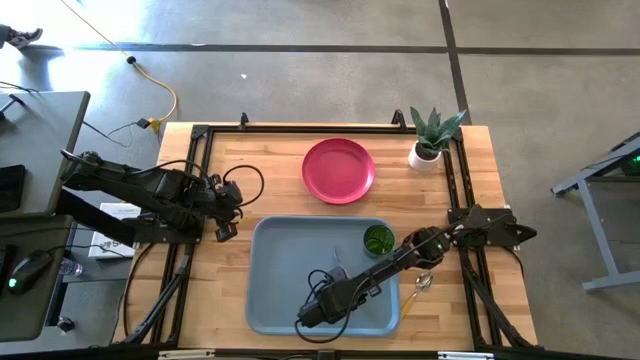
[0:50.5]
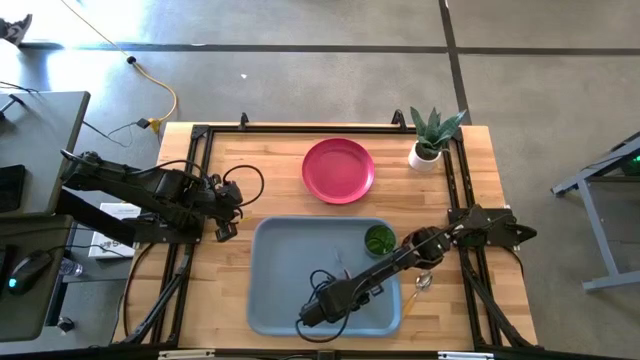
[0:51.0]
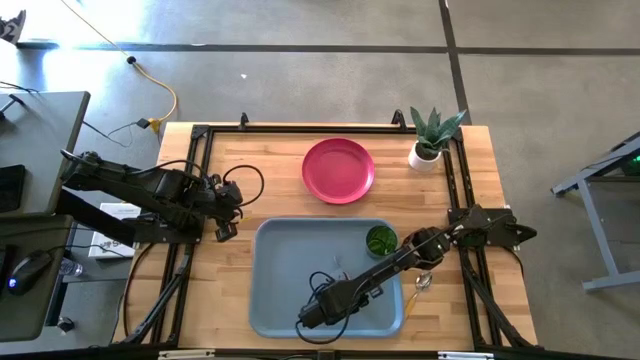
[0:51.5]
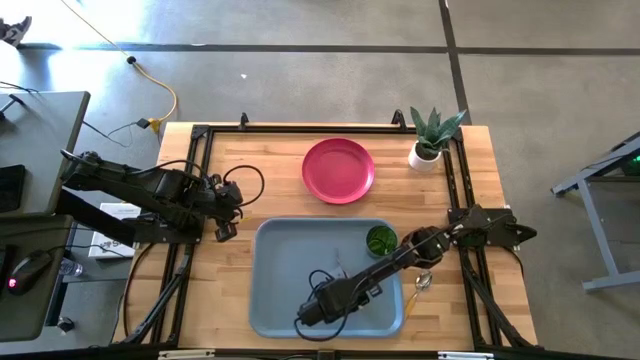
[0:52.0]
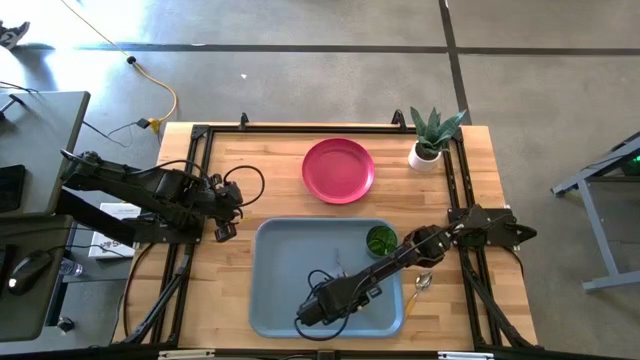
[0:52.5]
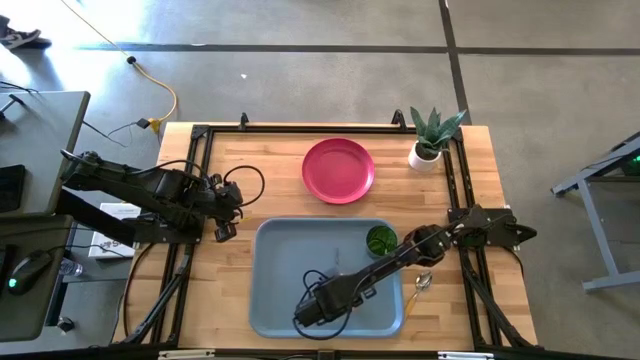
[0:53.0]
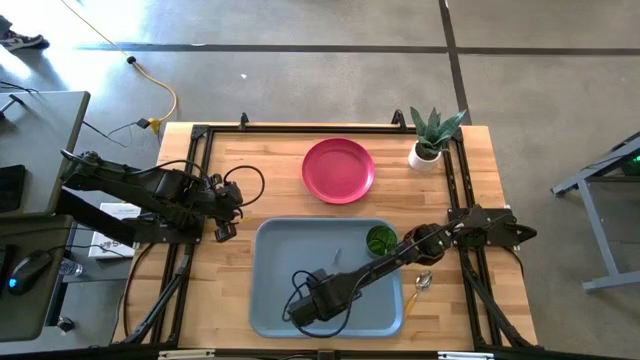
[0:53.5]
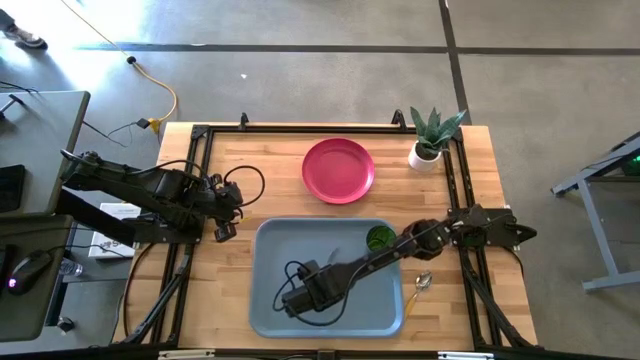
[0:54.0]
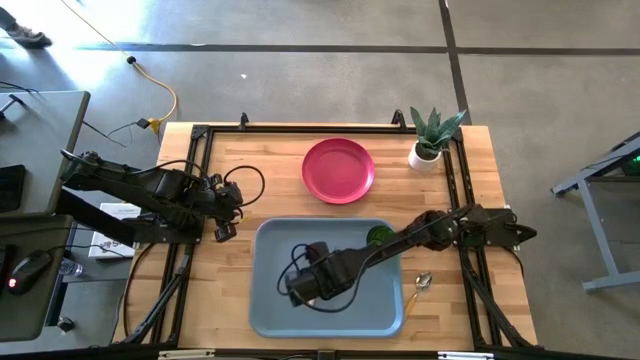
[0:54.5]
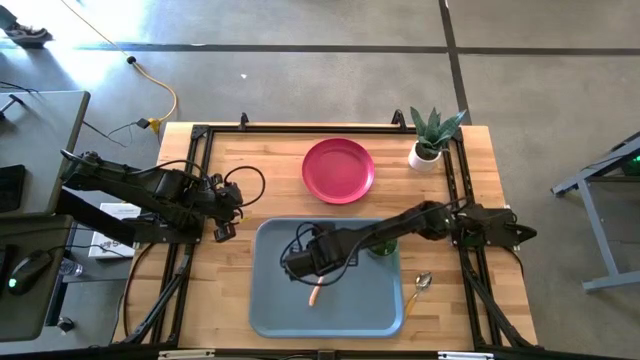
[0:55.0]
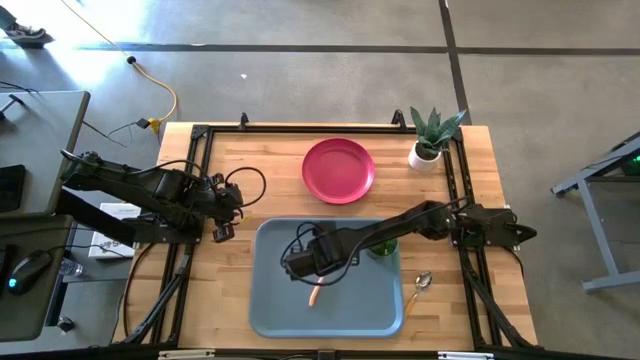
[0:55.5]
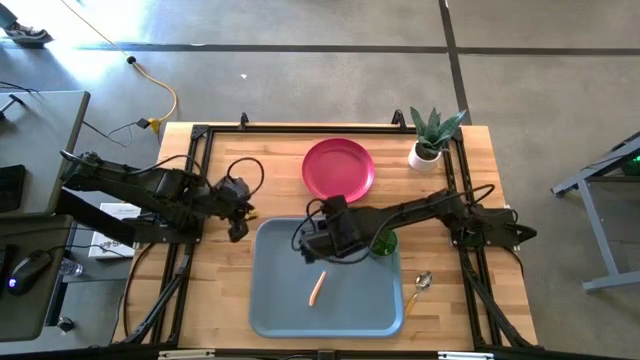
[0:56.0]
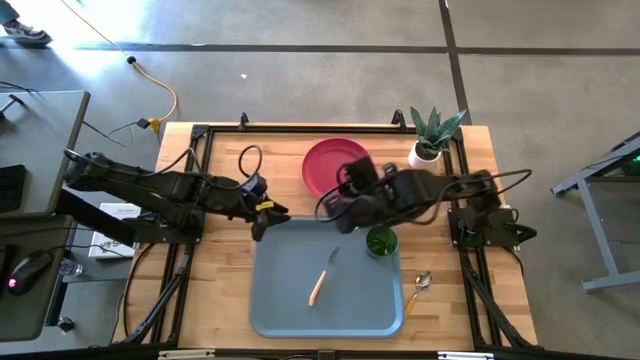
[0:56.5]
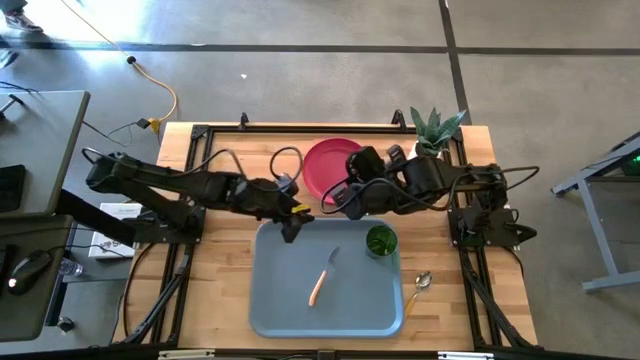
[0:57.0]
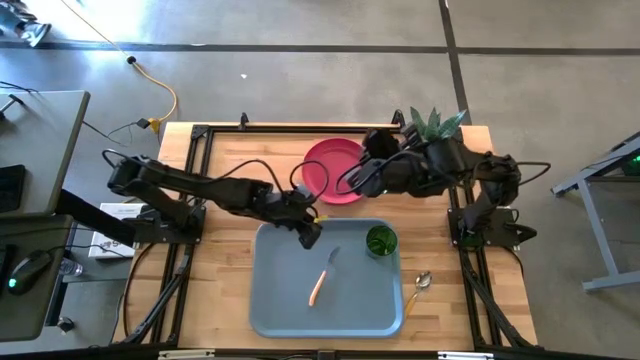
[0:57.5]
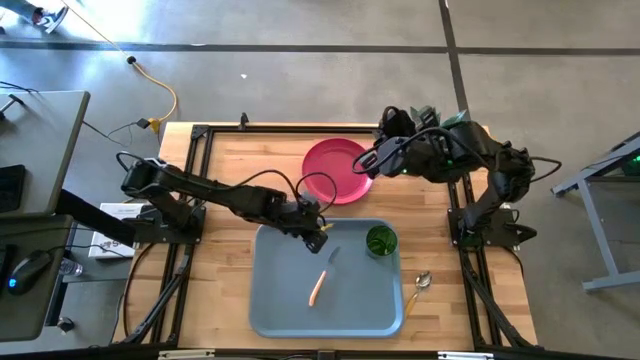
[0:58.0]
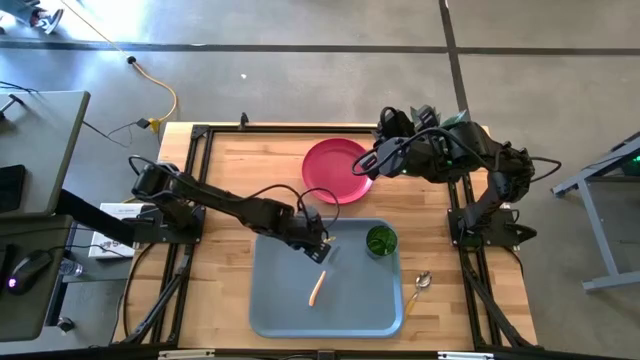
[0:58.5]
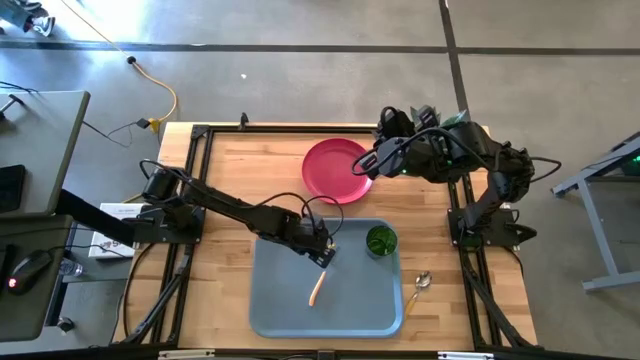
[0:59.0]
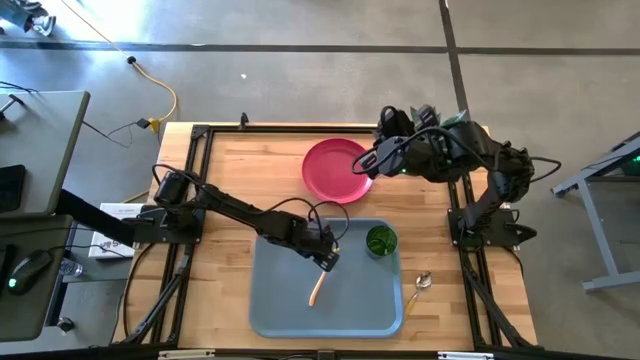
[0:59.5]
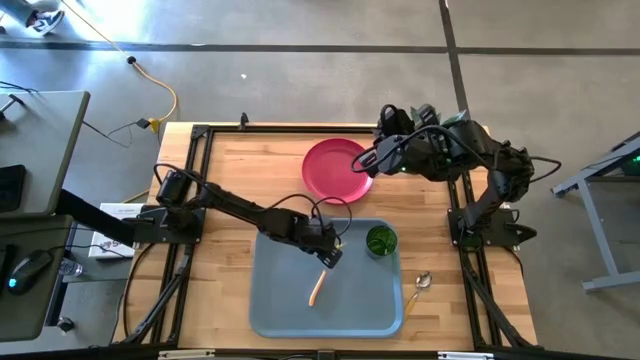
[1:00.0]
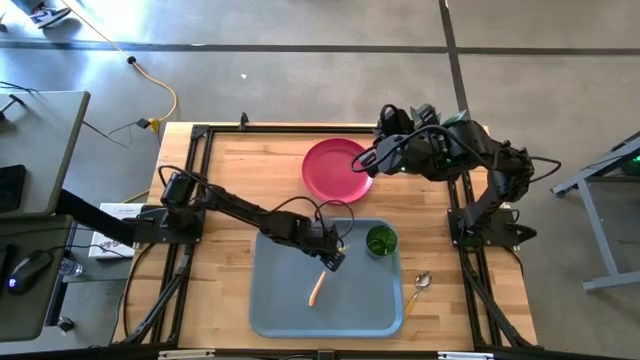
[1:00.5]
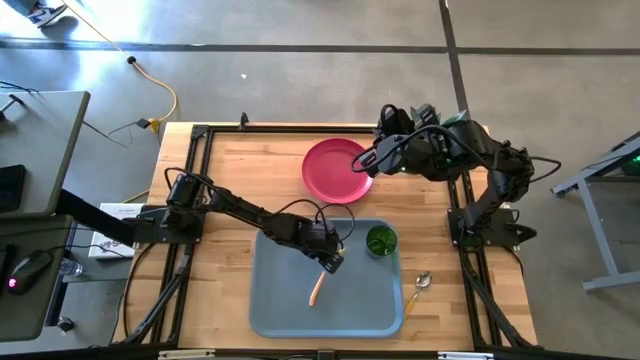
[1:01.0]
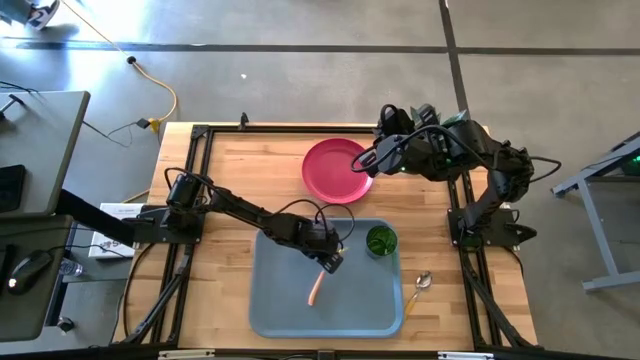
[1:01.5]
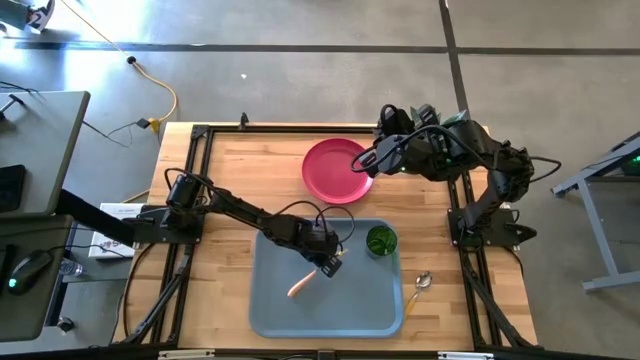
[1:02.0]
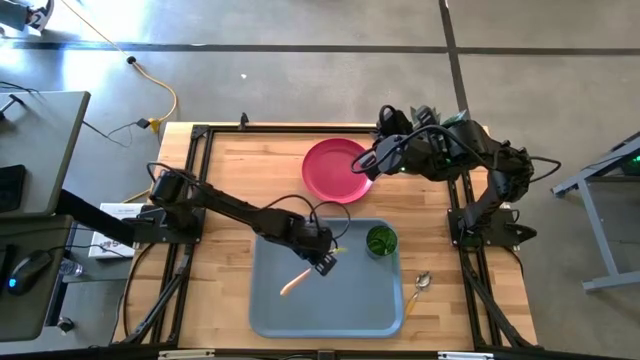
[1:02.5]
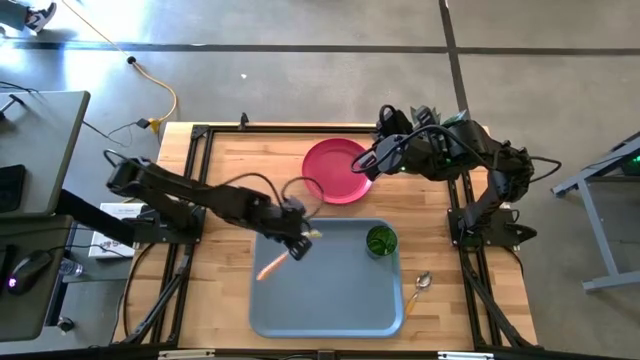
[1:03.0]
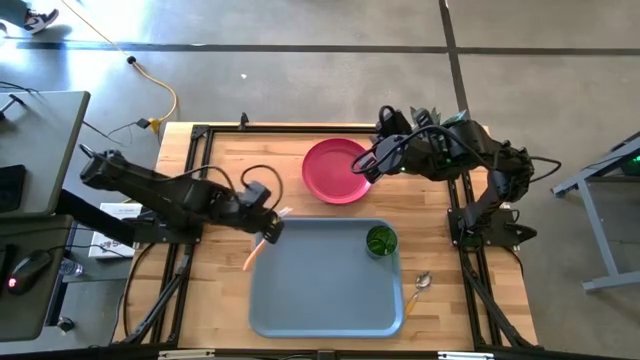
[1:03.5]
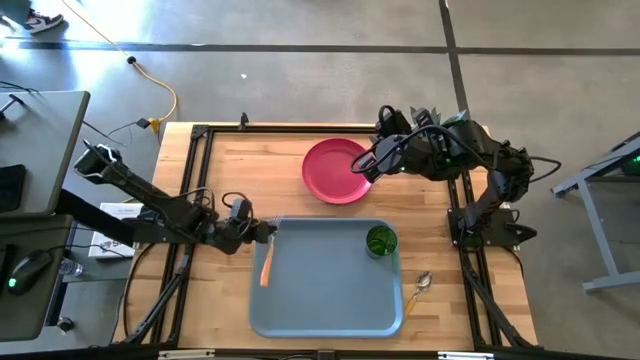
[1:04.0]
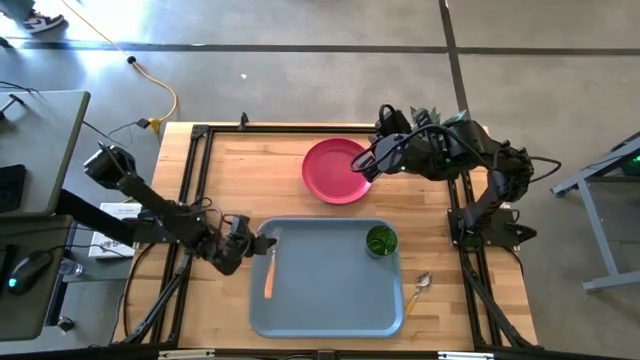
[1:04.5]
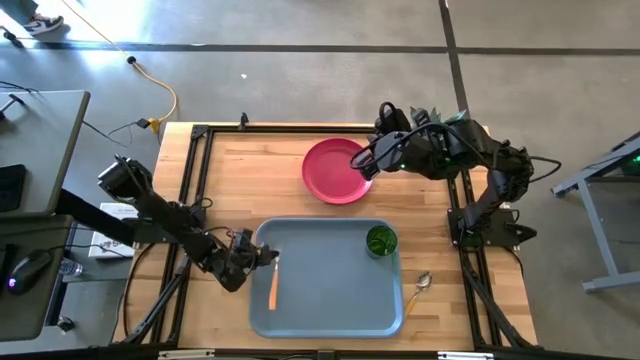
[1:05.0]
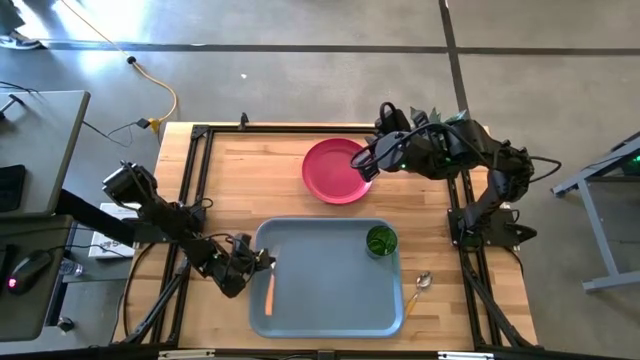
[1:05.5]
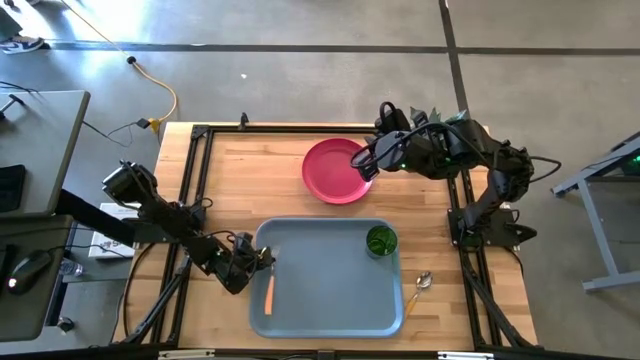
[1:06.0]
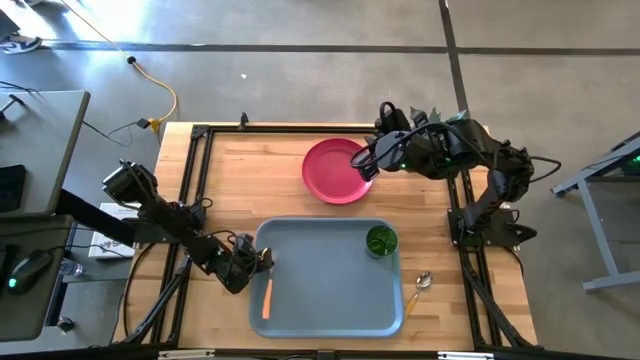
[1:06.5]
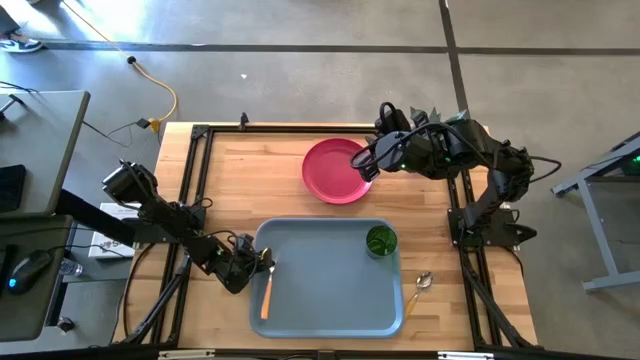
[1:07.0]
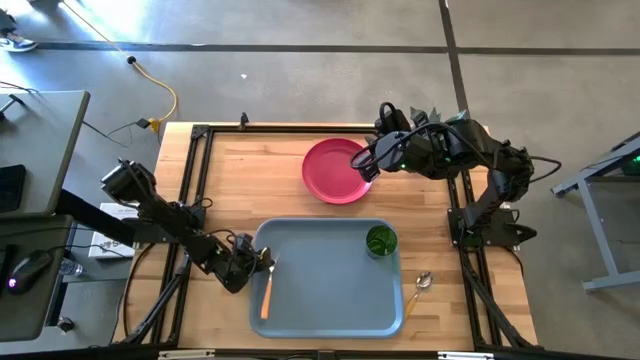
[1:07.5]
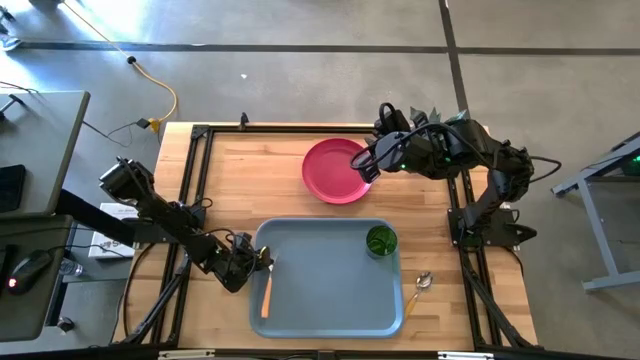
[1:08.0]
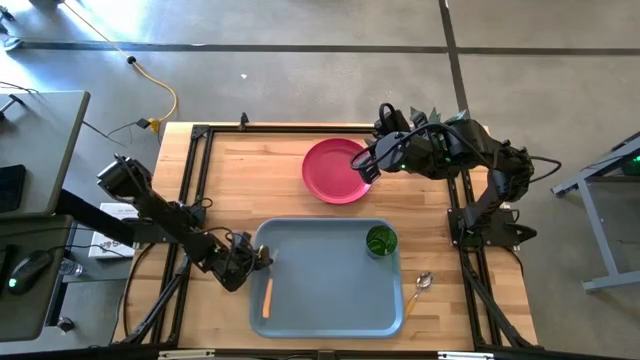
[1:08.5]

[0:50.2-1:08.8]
Task: Pick and place plate/cup/fork/spoon on tray
Put the orange fork on the blue serving tray to the bottom left of the green glass

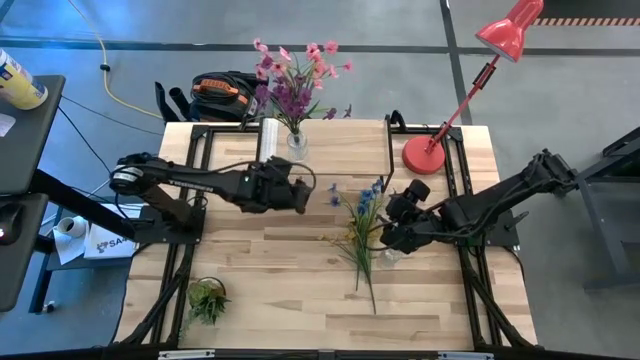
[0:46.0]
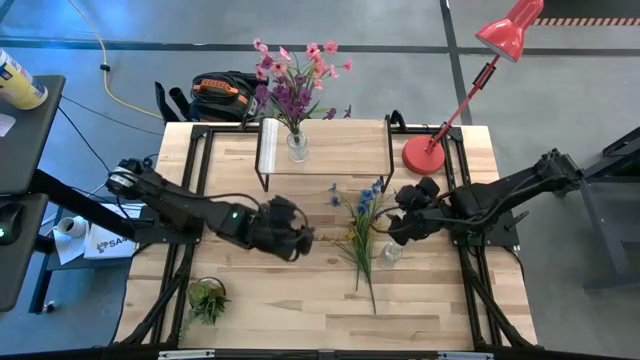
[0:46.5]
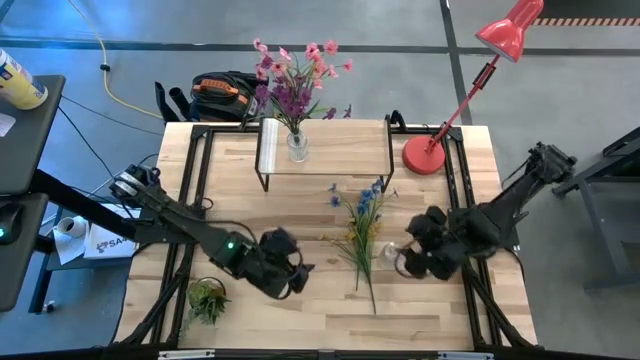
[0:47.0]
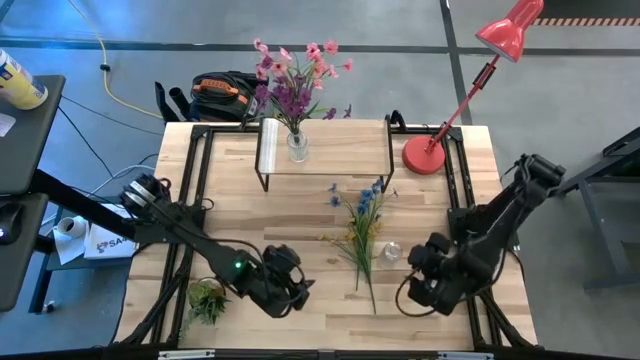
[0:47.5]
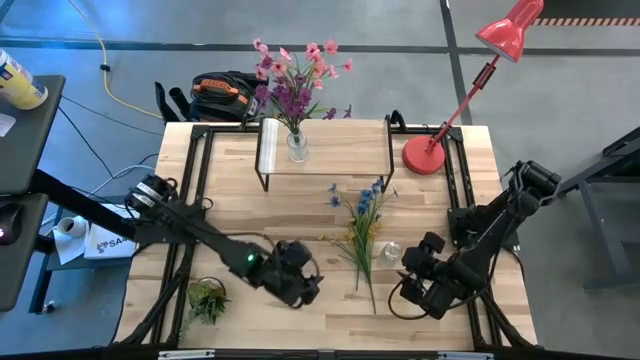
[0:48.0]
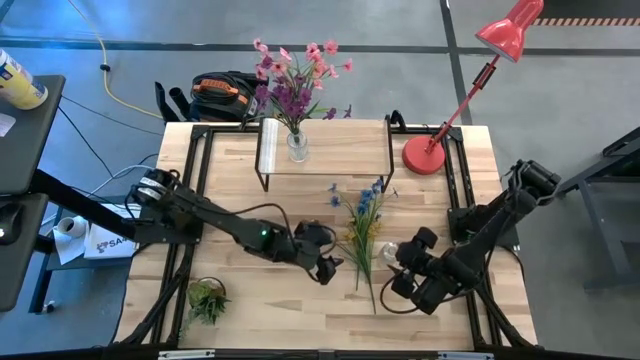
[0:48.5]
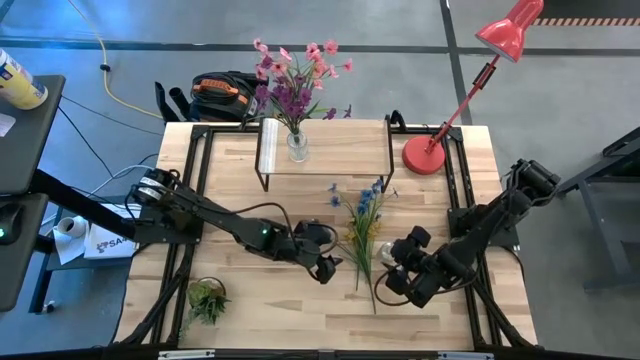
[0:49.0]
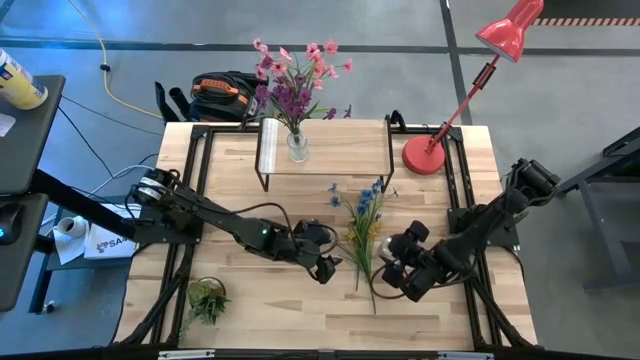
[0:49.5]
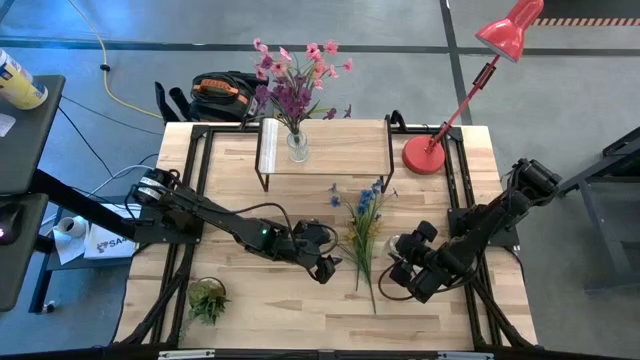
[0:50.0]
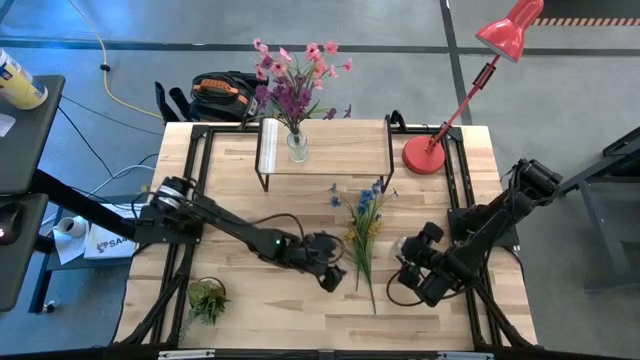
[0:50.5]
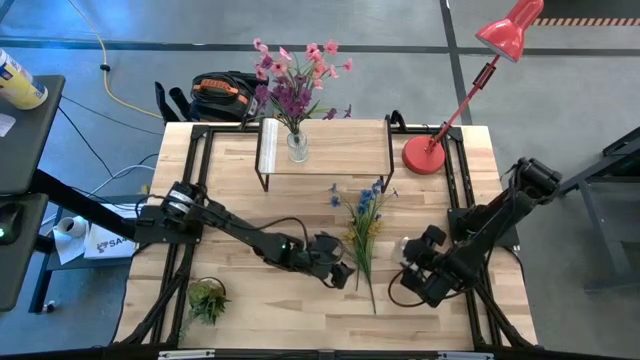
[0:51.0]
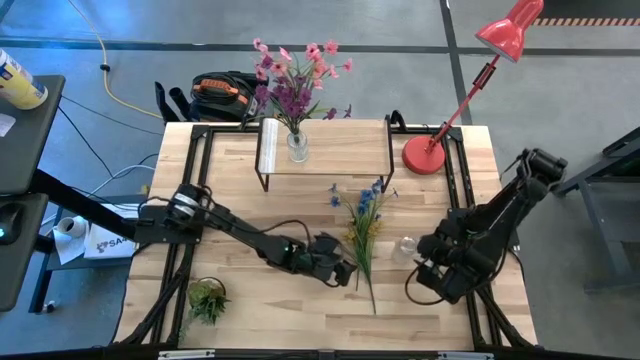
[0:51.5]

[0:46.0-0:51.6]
Task: Pick and place flowers into a vace then onto a shelf
Adjust the transparent vase
